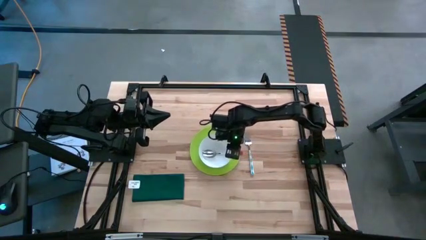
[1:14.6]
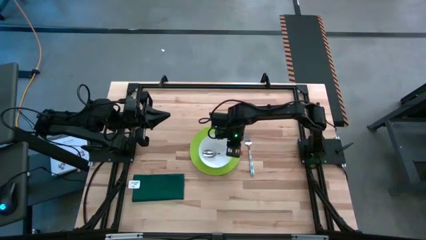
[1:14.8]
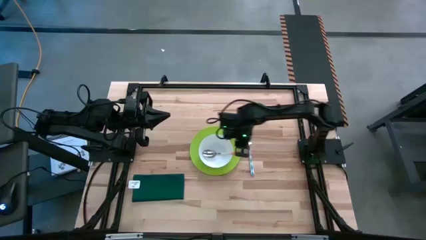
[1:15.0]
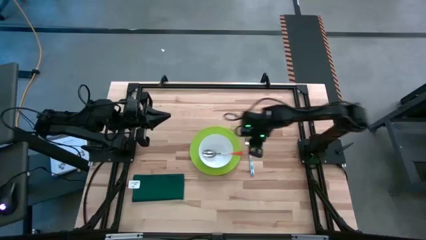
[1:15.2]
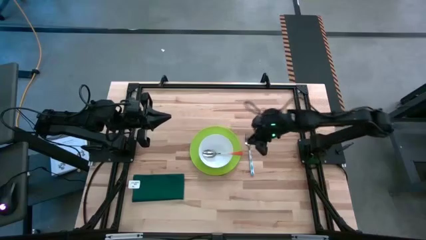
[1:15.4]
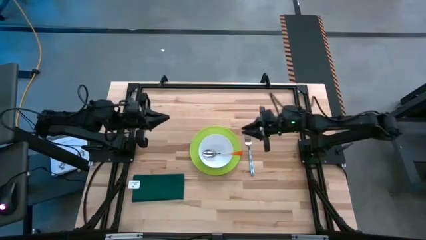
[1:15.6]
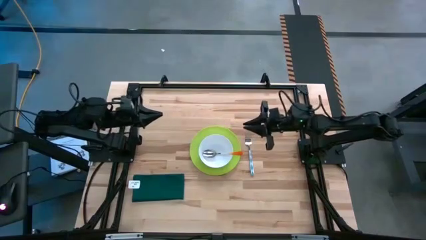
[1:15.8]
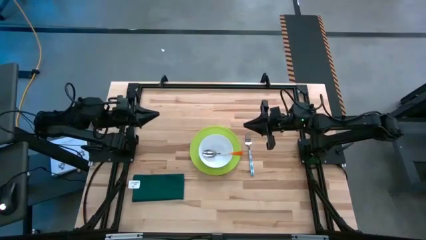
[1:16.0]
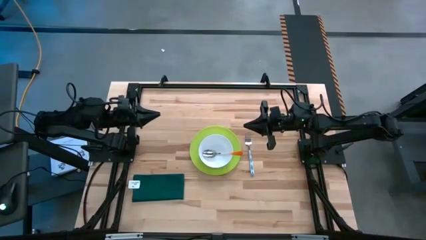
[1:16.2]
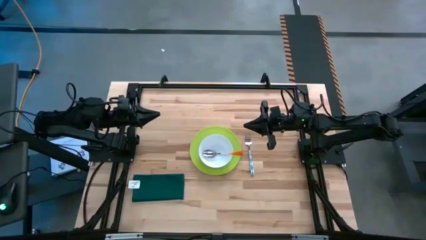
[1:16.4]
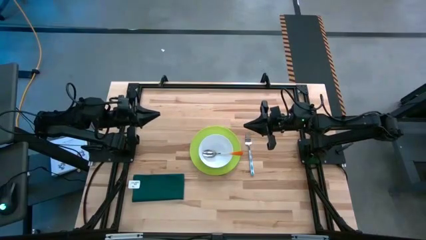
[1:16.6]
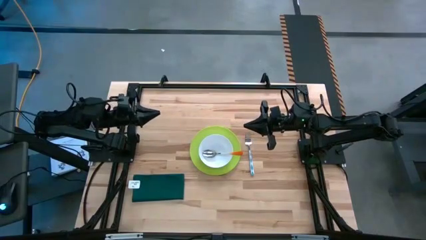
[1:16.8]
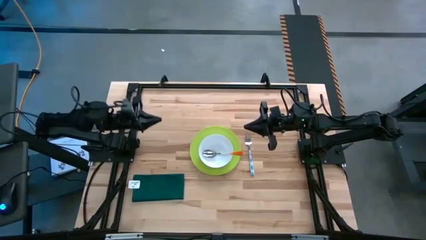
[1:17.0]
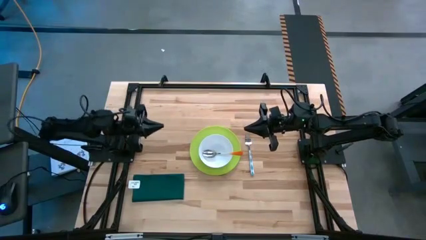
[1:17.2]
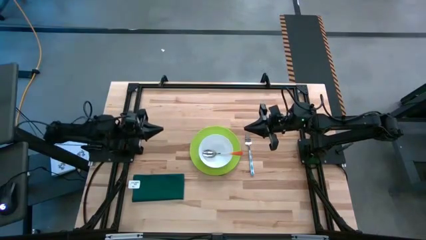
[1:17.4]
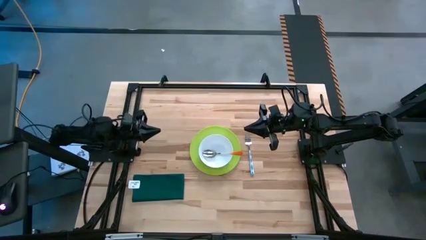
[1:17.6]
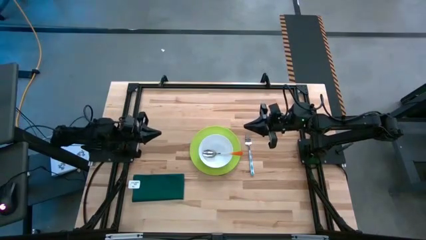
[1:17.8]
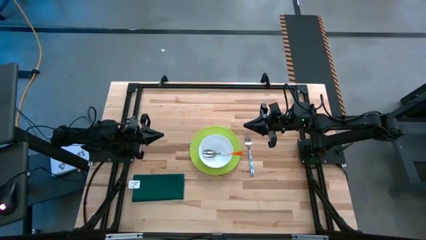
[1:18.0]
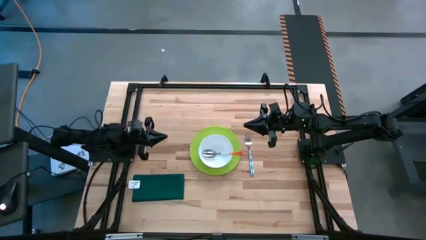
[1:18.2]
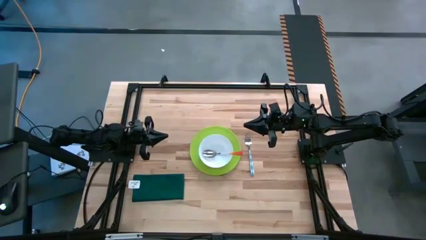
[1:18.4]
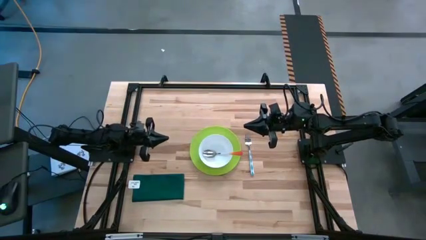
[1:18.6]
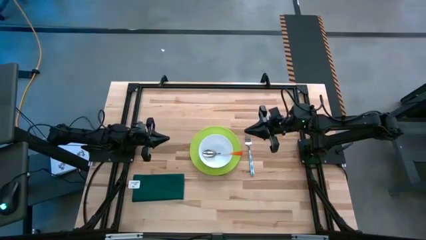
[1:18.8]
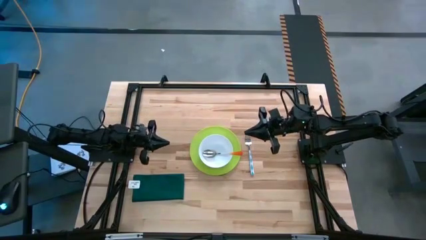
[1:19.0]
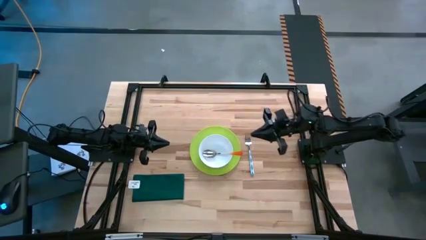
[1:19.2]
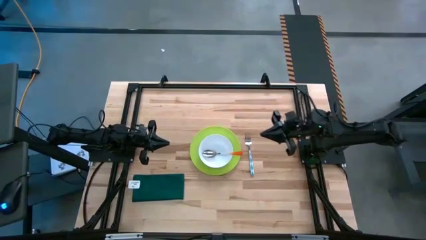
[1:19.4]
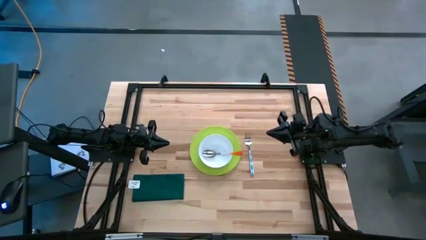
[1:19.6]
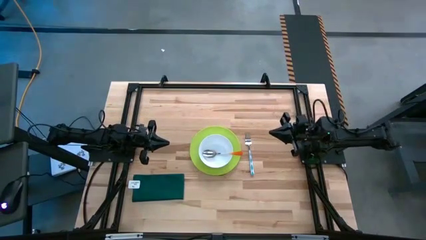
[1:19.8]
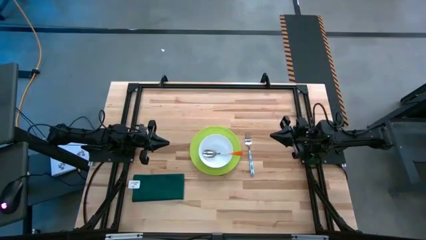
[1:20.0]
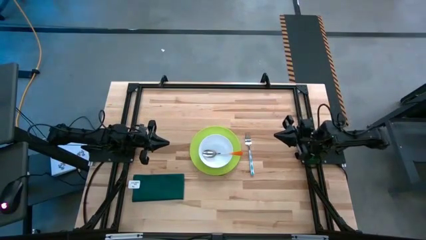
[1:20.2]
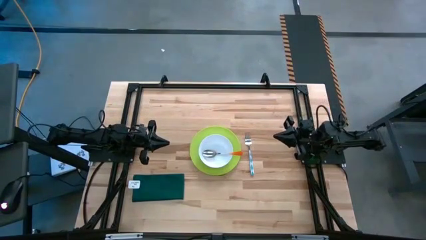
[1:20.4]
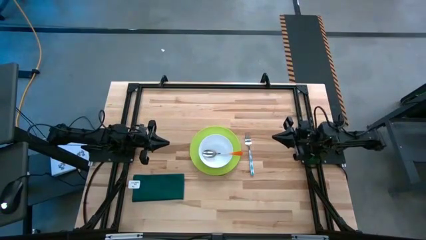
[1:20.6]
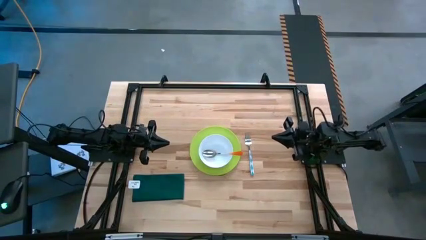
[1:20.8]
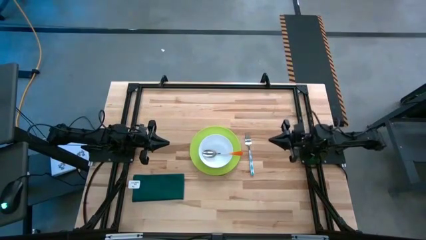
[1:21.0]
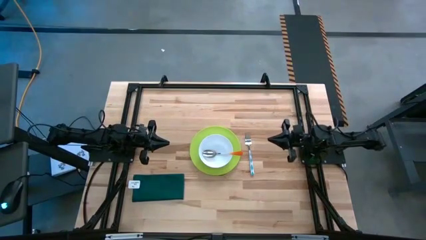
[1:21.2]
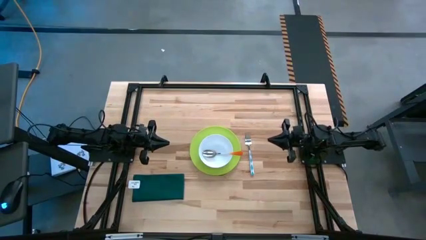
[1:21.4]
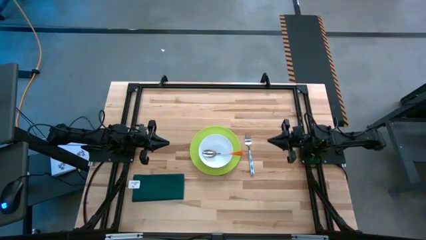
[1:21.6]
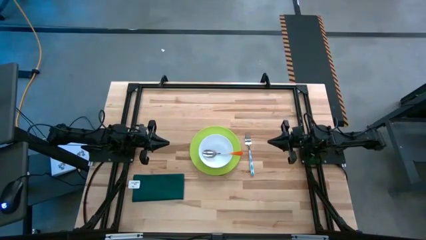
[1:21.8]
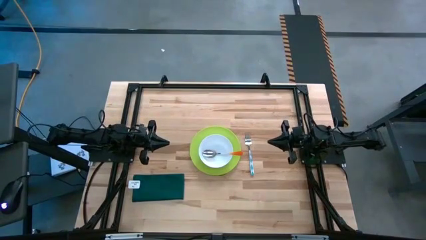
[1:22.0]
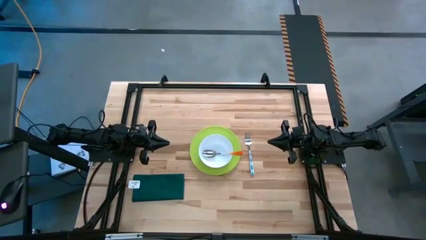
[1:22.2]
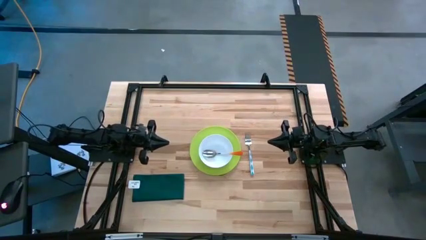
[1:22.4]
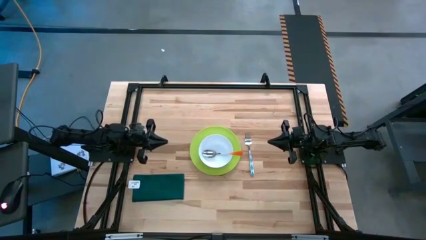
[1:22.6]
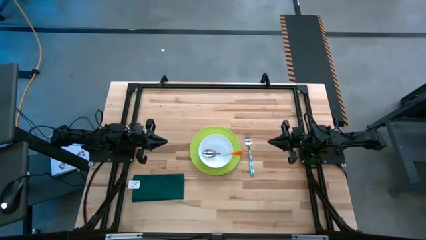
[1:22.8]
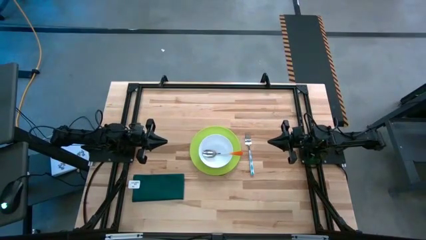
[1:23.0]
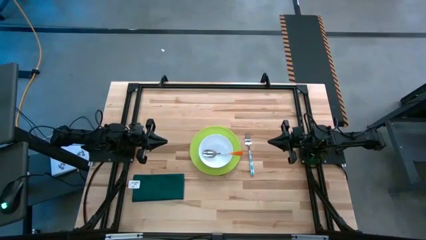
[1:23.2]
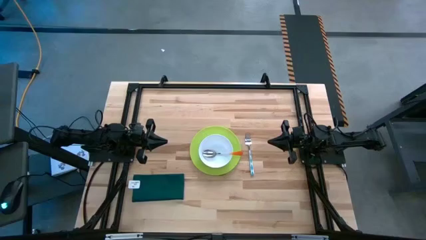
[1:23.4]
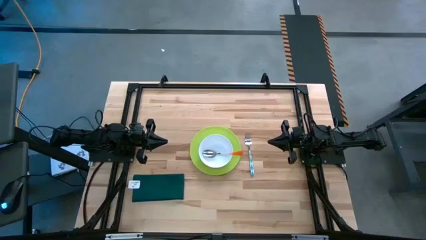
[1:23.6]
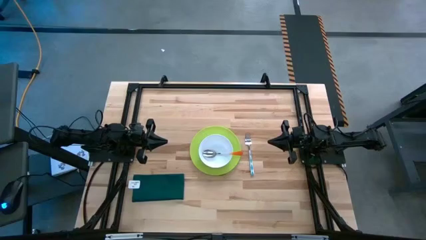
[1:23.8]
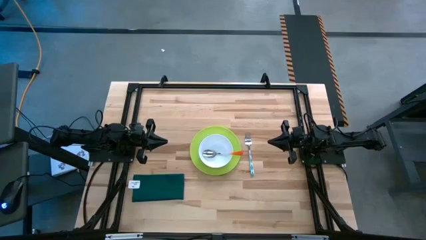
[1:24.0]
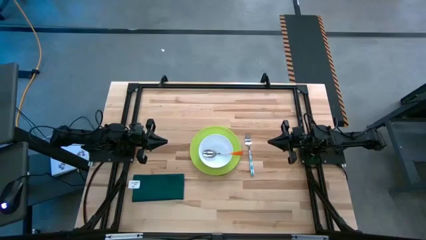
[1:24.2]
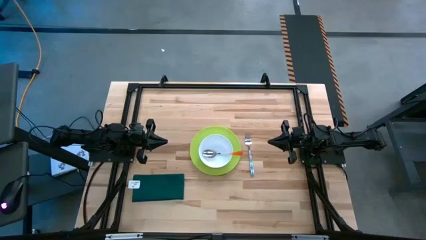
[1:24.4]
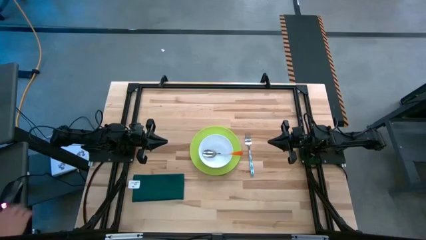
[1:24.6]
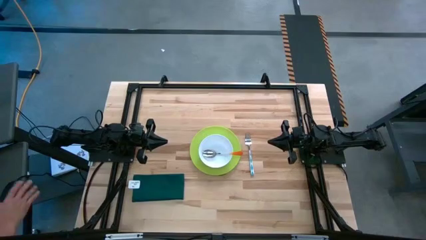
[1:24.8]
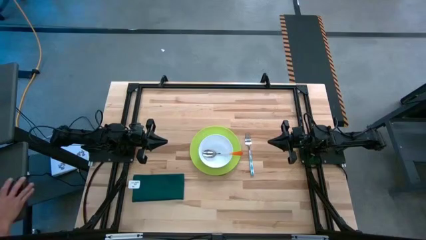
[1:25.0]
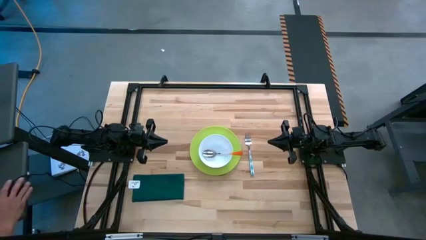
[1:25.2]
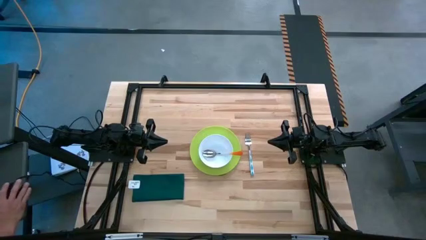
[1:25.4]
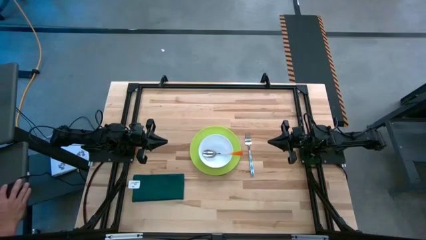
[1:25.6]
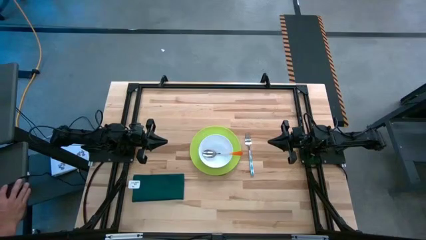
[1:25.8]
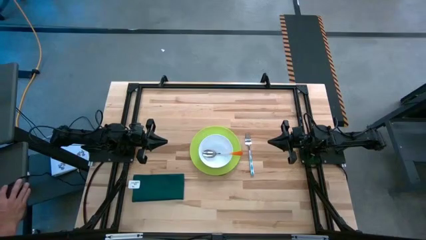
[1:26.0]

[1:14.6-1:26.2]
Task: Set table place
Return to Home Position

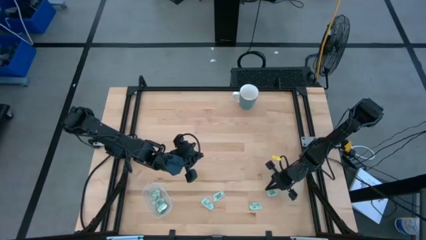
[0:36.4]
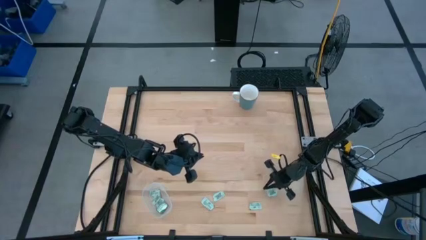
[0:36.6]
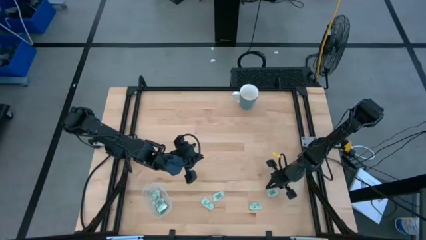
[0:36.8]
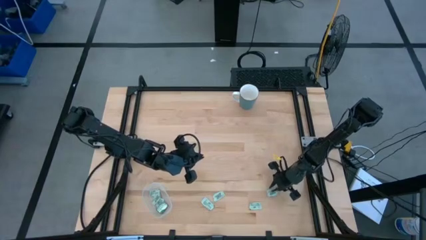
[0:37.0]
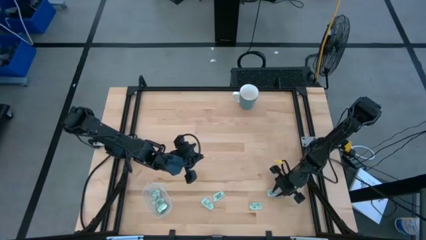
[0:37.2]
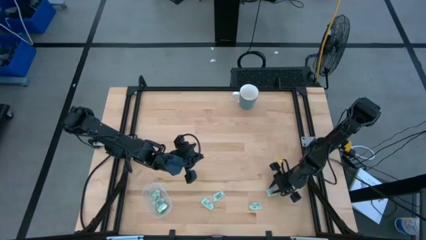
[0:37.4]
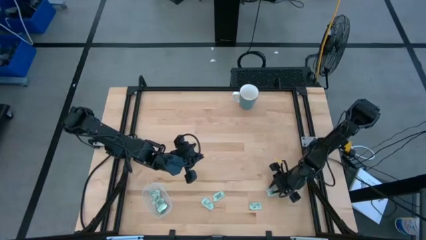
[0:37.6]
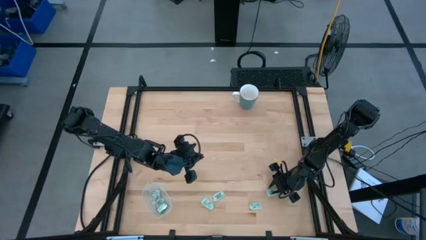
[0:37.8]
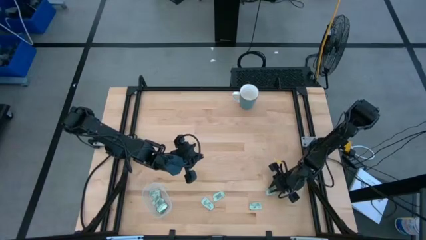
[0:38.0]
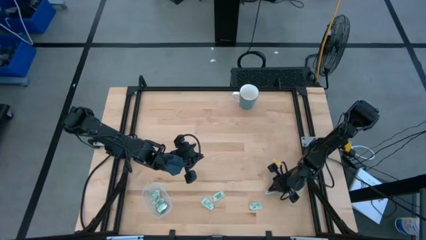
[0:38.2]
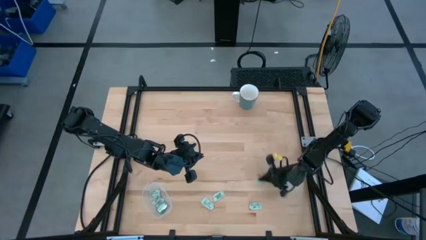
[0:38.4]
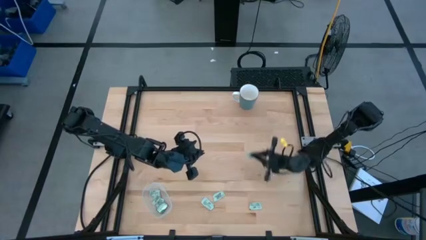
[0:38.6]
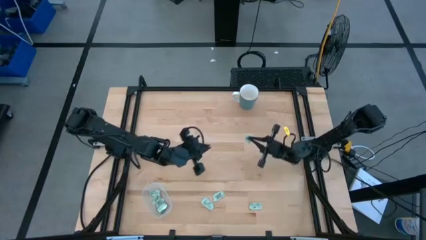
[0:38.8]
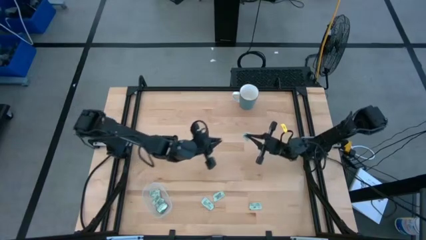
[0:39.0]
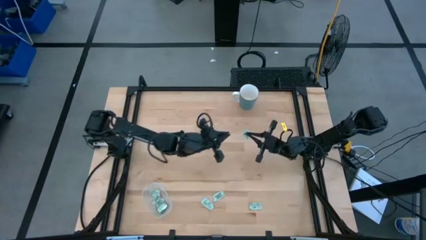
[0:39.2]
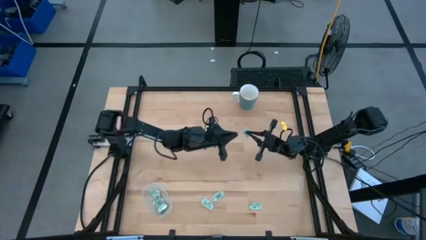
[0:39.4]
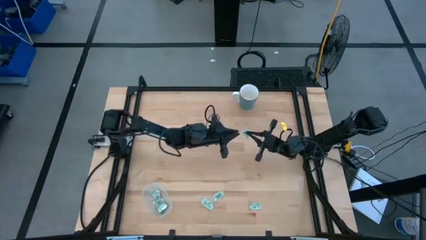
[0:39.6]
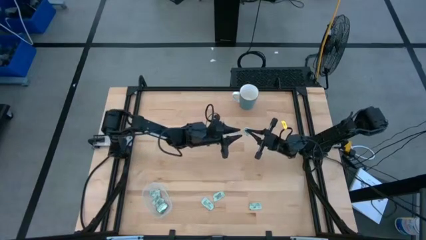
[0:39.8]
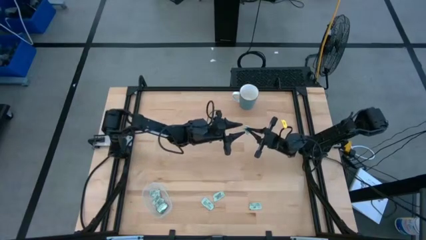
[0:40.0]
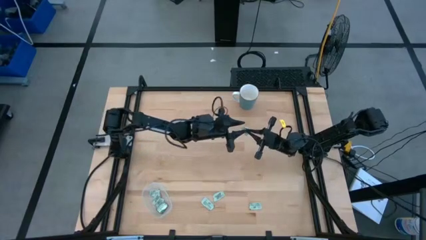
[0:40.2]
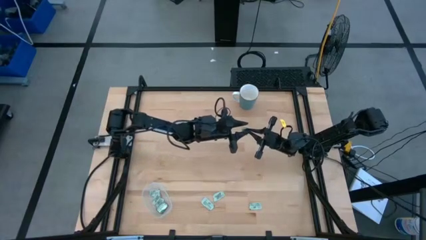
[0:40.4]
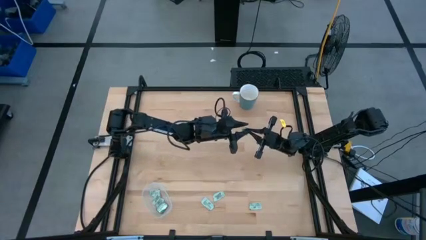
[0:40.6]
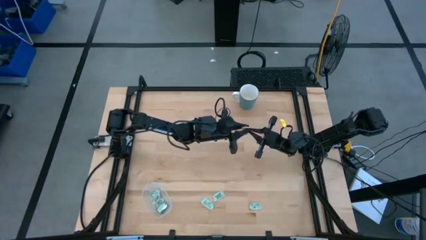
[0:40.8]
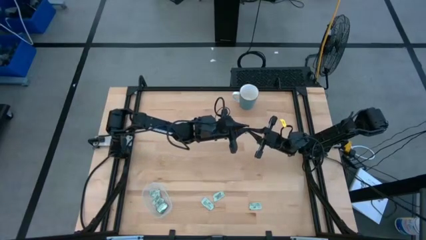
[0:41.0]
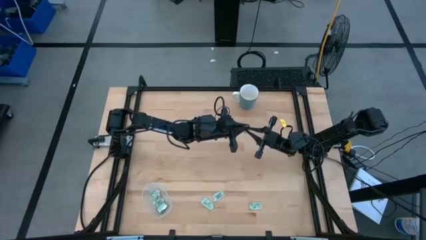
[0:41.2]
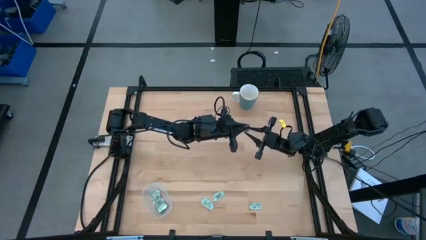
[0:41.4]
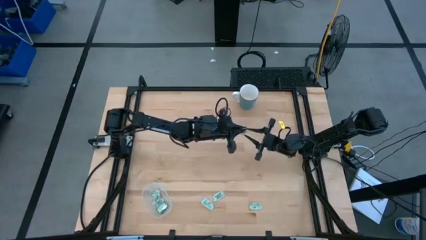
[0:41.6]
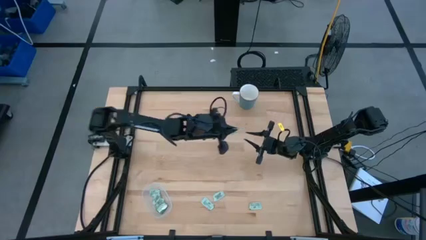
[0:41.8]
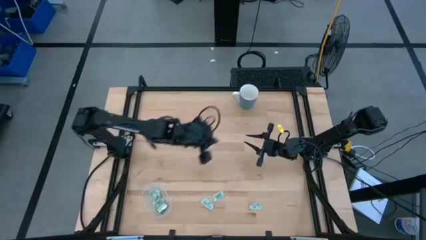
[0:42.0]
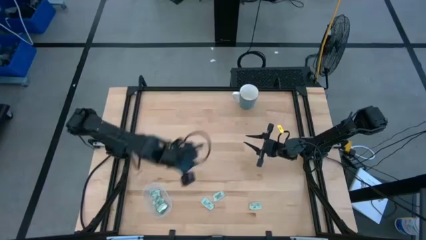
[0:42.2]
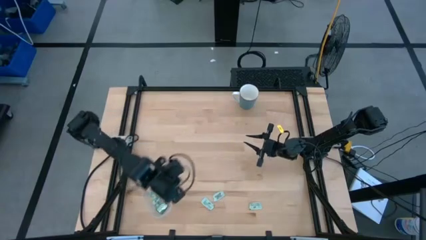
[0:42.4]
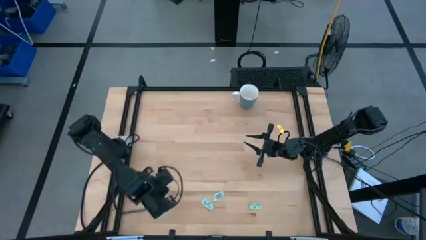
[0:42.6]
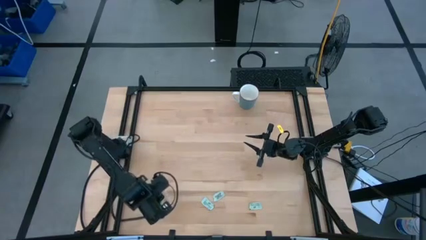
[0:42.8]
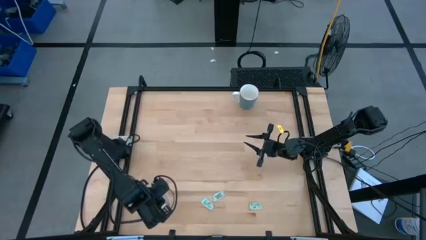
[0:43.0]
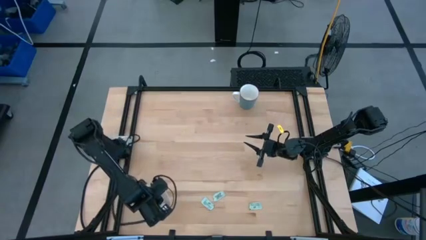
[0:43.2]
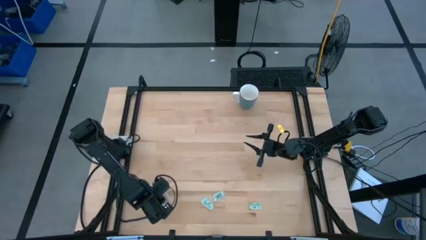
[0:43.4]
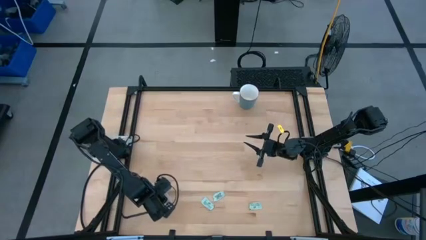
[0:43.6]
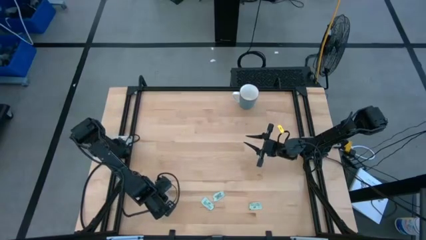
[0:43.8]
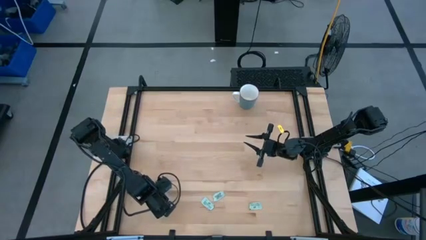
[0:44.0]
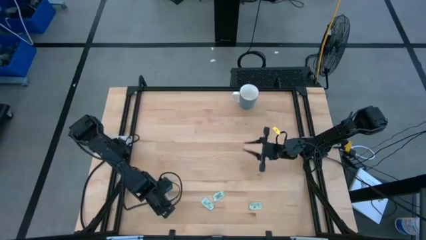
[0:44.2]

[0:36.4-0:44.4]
Task: Pick and place Stevia / Truvia into bins
Put the stevia packet into the transparent container
